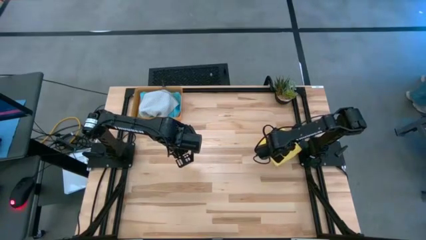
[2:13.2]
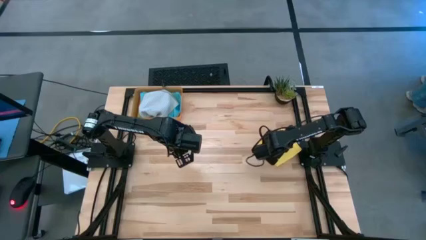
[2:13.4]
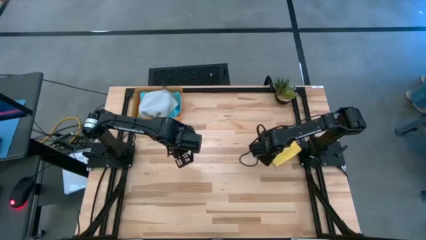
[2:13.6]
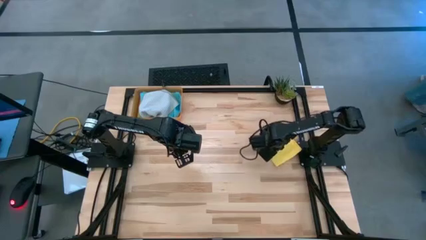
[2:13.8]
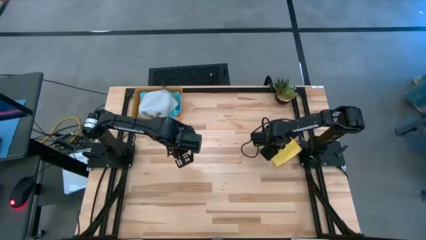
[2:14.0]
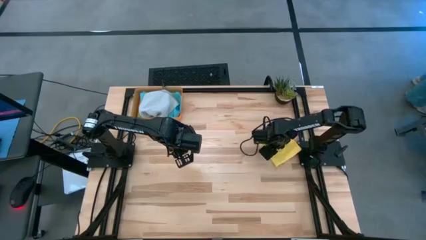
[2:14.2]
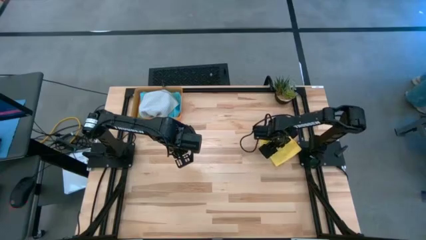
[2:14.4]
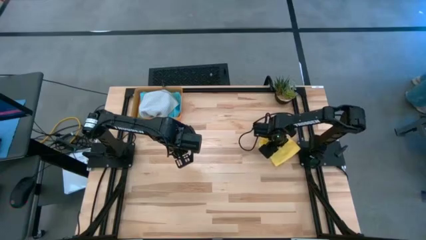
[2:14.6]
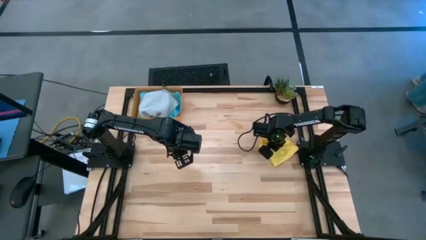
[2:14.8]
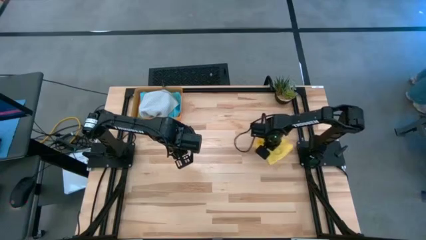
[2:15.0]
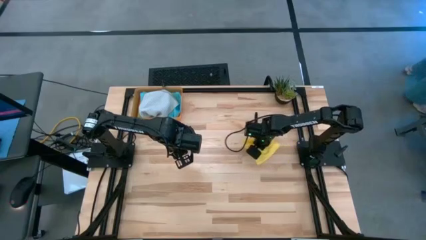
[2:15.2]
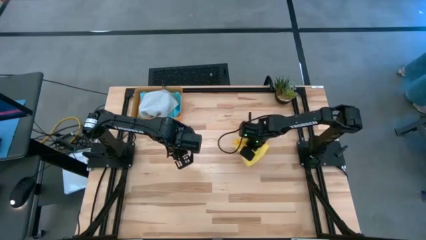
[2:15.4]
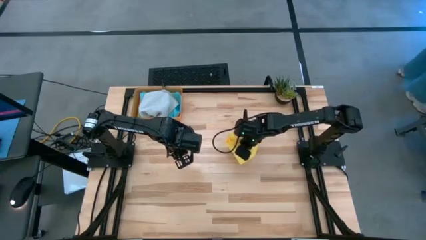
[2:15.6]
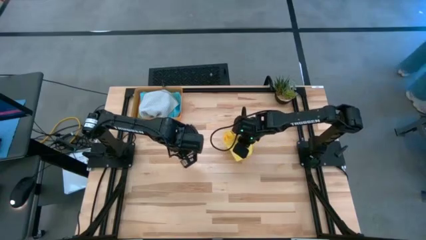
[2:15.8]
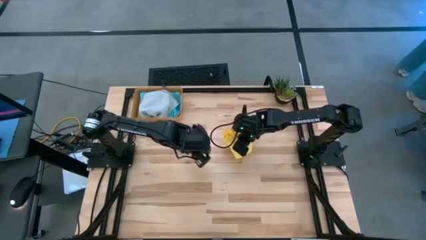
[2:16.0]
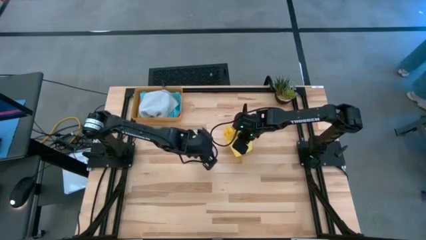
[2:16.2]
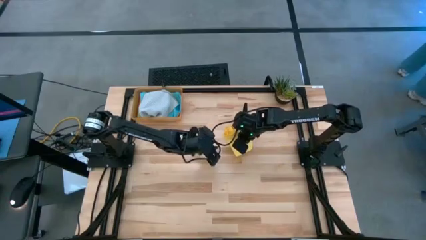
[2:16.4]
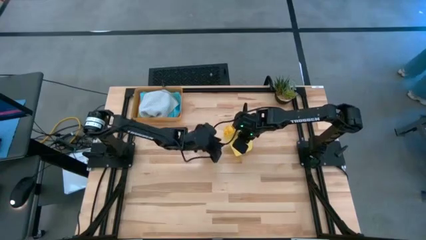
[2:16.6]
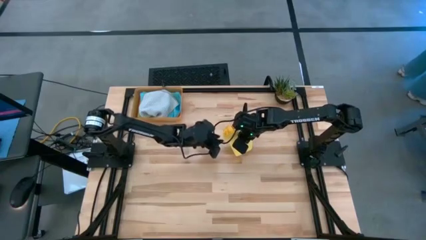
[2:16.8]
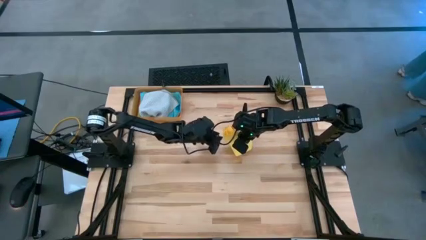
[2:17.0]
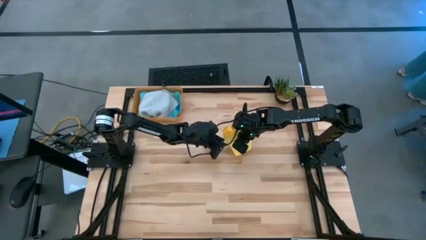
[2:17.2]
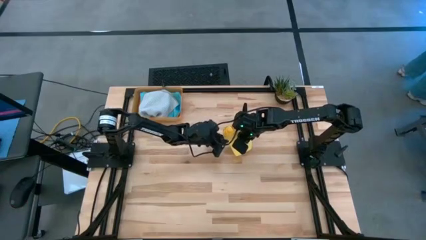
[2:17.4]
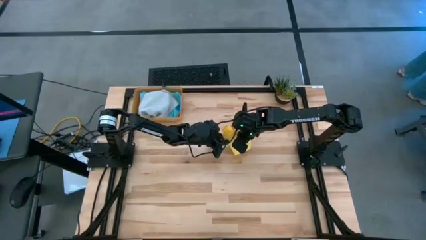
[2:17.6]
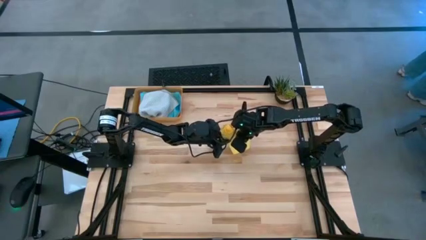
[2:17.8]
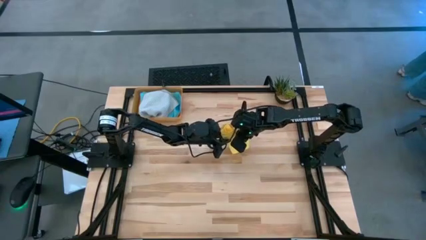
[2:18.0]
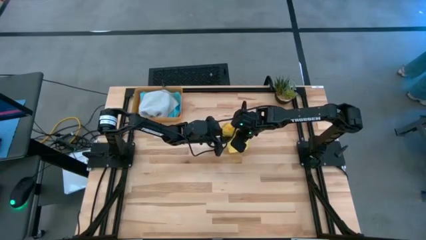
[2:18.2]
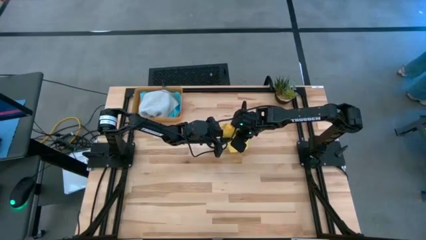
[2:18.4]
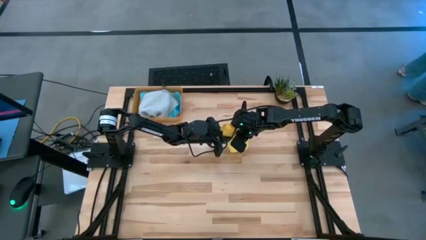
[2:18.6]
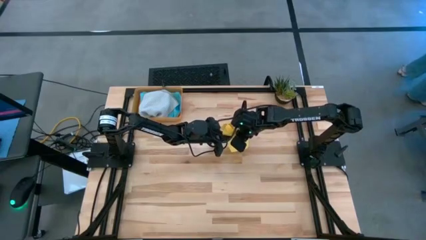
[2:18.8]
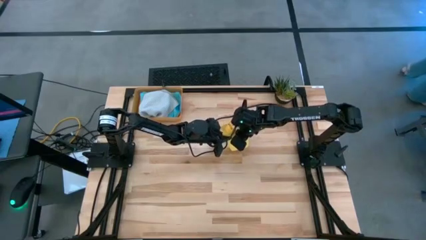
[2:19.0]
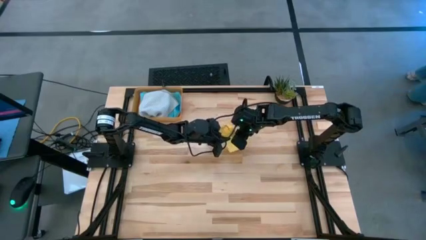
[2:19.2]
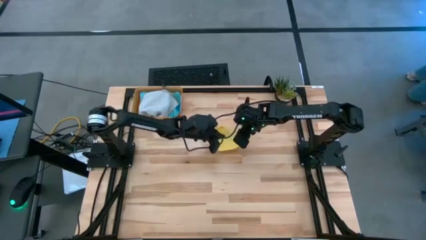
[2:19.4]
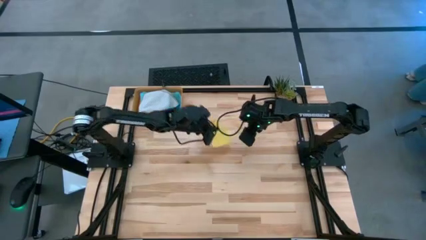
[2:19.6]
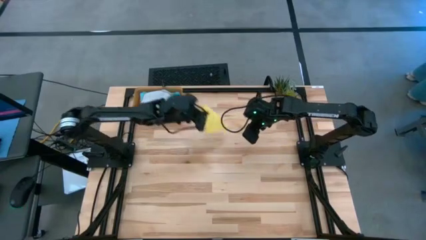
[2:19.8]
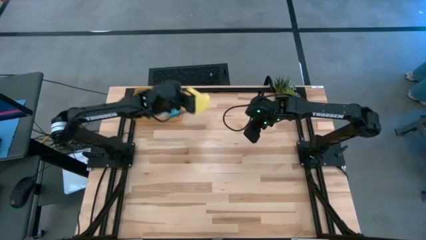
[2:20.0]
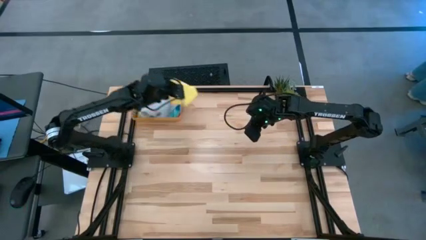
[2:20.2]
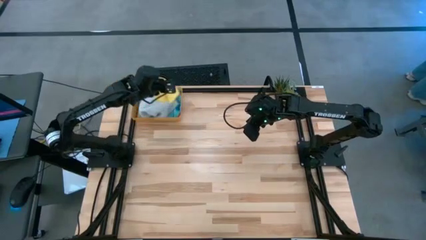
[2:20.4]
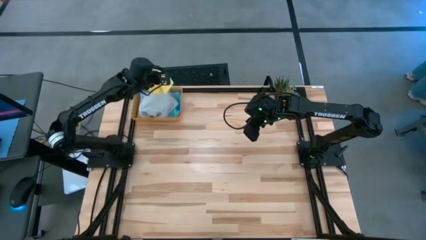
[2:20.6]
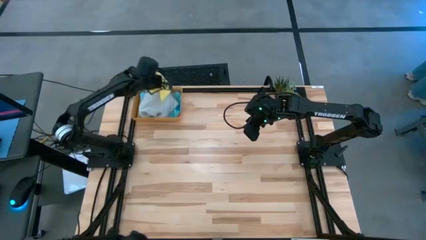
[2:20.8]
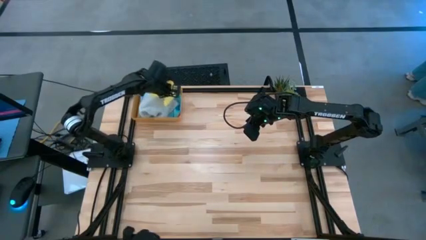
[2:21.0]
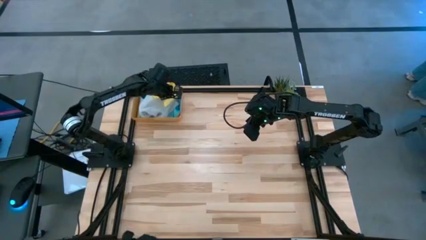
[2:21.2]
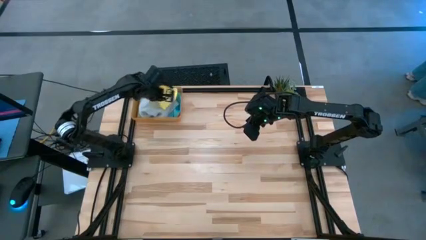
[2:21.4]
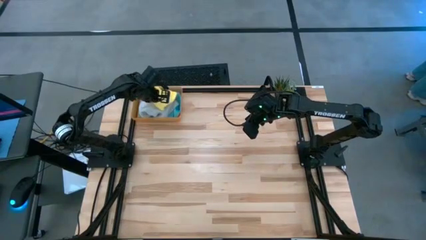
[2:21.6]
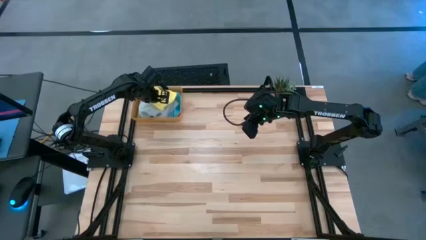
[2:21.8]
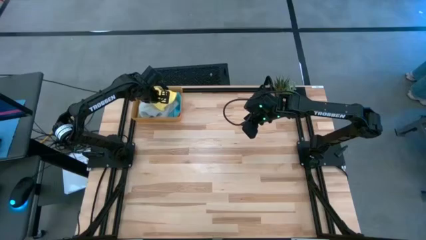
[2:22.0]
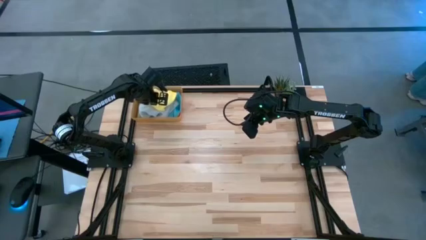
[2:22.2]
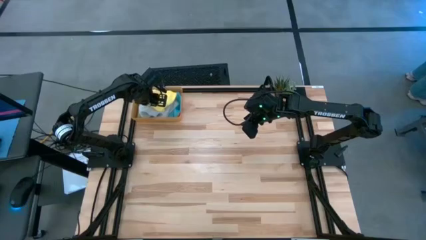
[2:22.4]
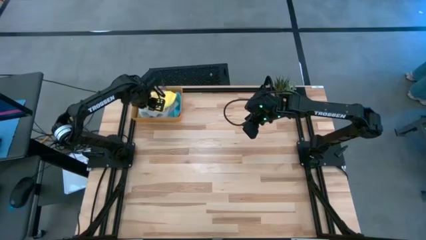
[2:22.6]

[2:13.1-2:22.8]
Task: Fold microfiber towels
Put the yellow microfiber towel into the orange bin

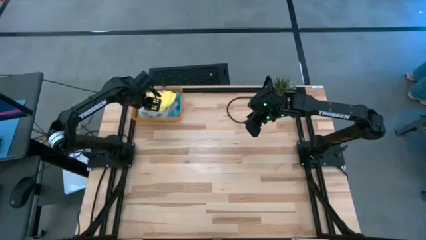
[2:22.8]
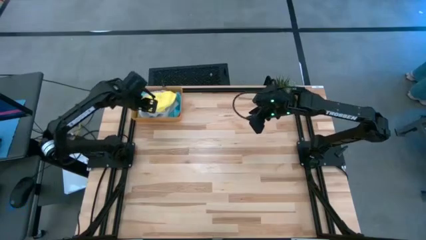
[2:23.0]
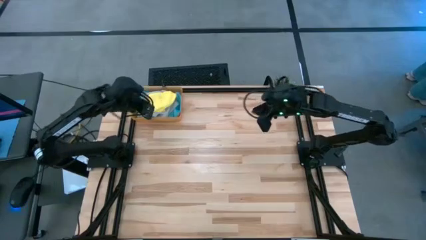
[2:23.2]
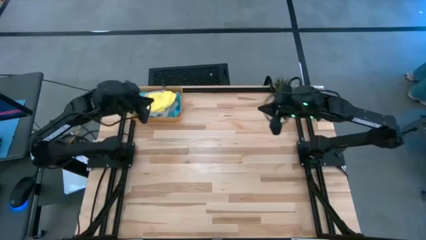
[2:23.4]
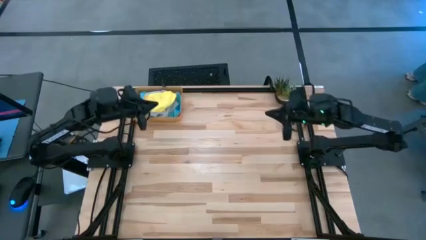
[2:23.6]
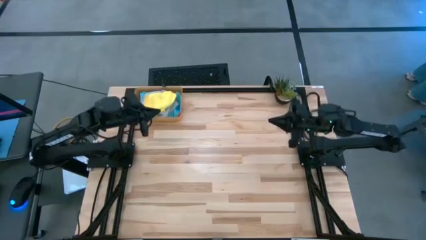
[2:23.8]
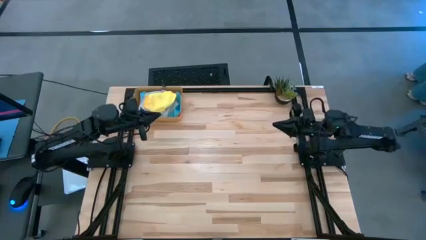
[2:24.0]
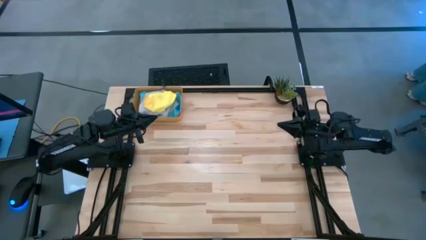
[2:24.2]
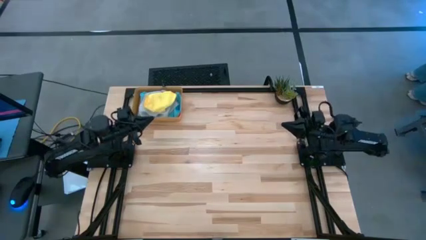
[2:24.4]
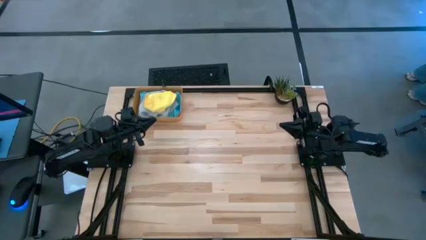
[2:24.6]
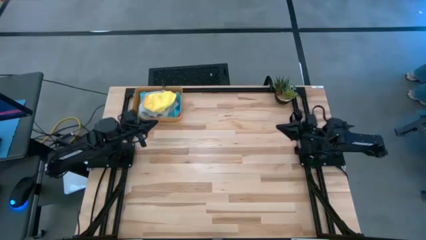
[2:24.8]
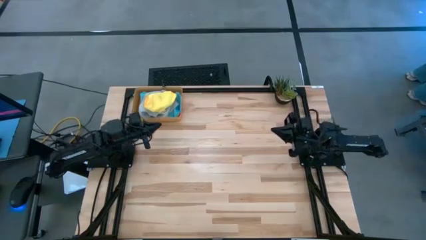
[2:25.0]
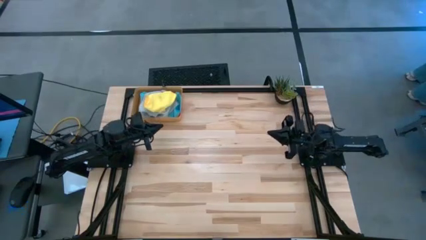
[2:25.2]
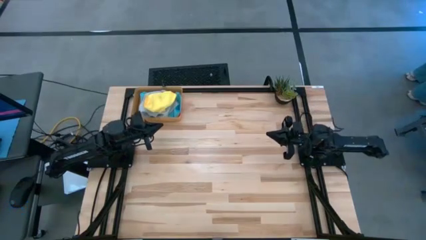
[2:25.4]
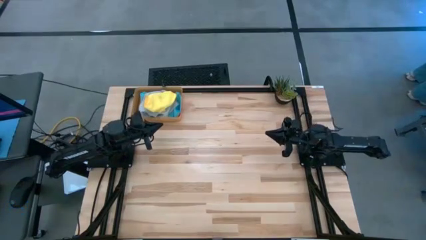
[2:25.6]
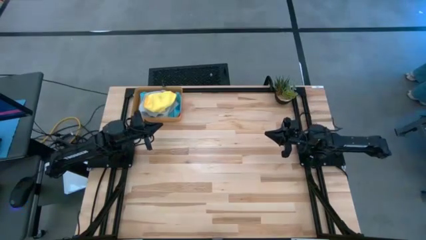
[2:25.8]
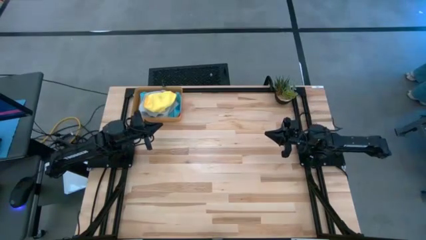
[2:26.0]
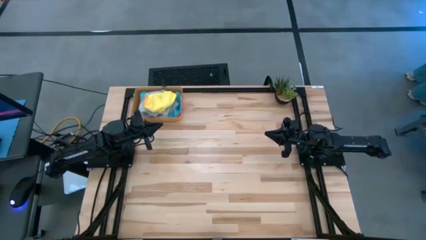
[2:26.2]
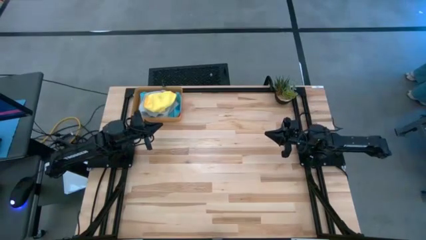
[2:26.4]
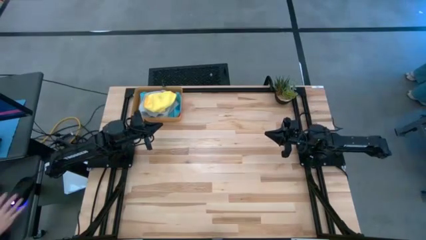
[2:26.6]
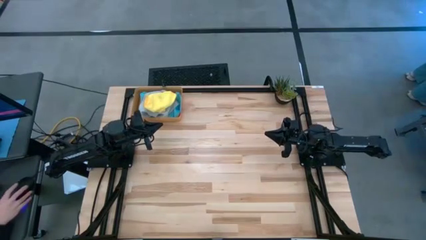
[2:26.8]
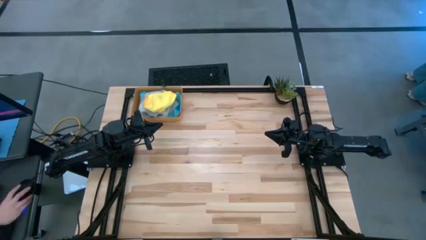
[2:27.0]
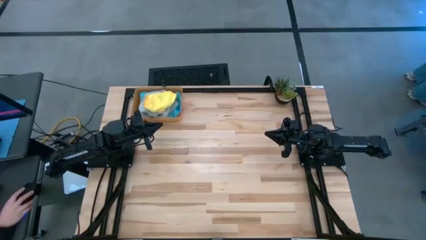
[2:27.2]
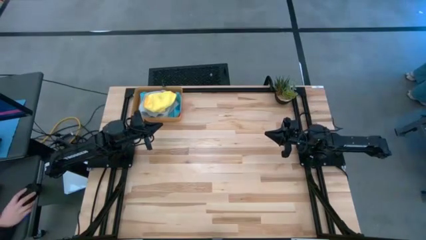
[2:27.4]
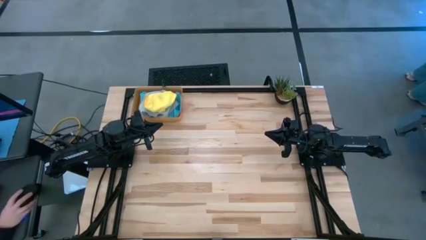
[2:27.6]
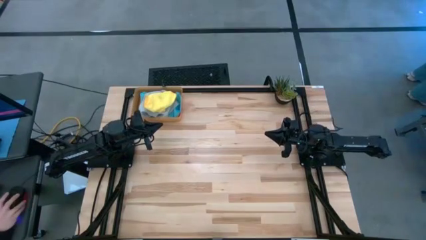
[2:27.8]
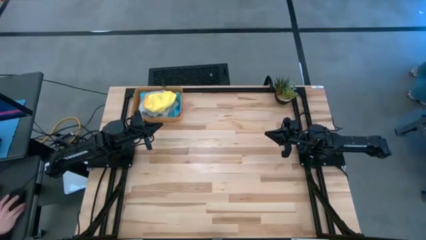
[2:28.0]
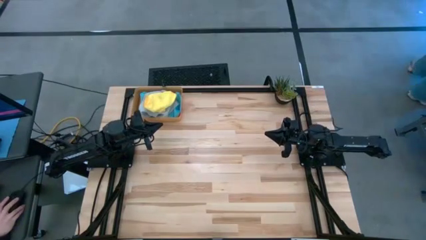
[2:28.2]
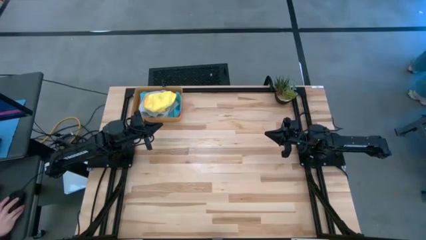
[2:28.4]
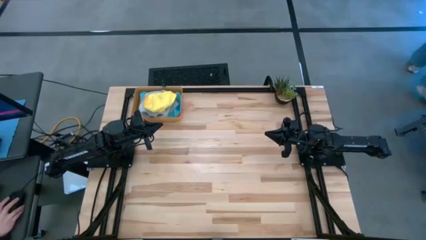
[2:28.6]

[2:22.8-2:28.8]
Return to Home Position
